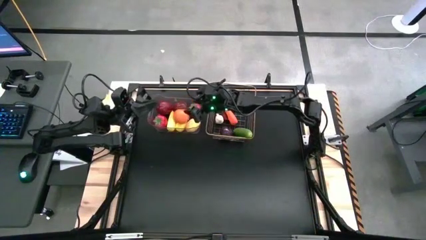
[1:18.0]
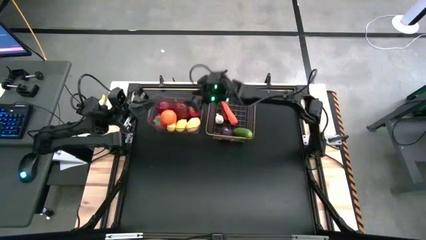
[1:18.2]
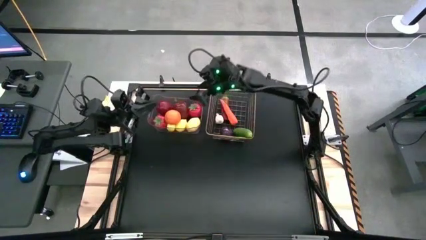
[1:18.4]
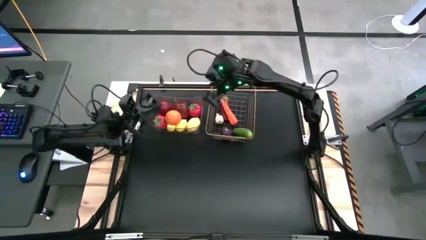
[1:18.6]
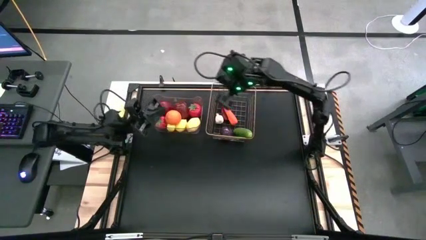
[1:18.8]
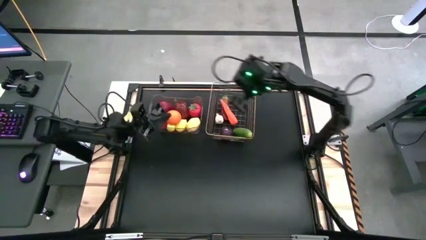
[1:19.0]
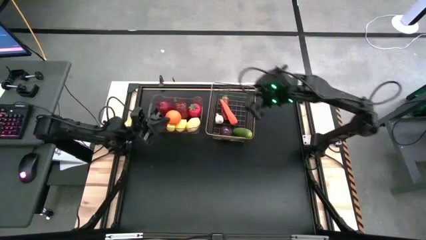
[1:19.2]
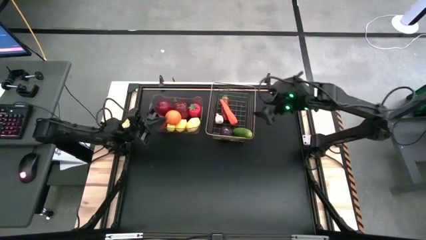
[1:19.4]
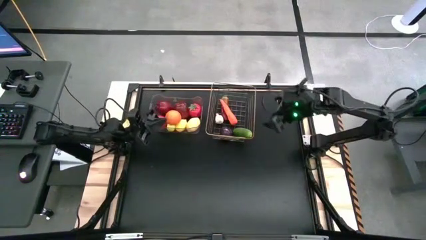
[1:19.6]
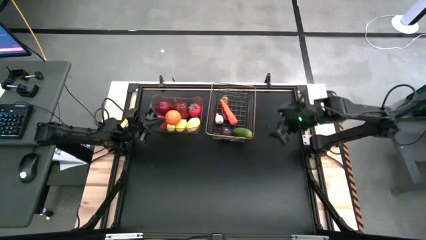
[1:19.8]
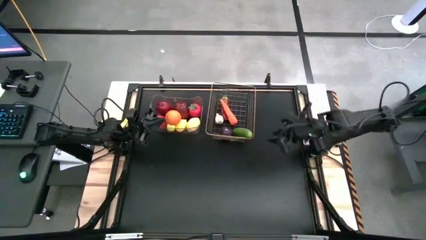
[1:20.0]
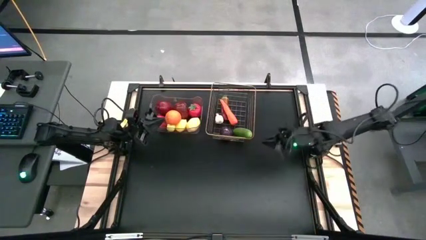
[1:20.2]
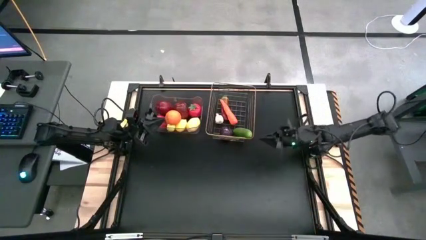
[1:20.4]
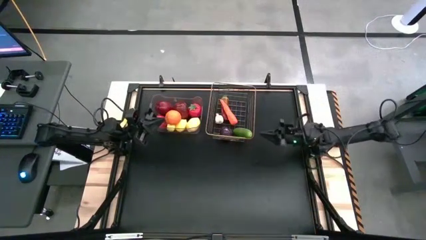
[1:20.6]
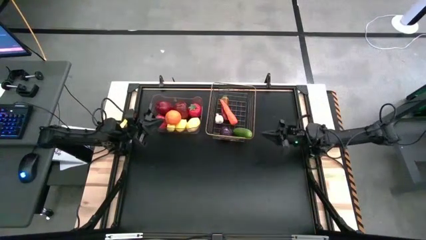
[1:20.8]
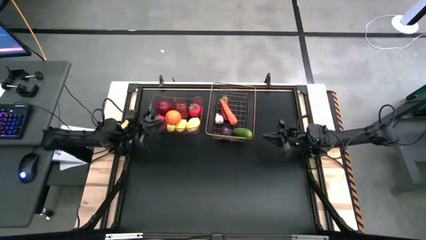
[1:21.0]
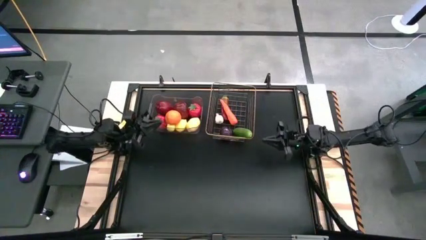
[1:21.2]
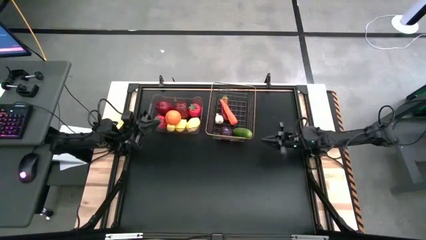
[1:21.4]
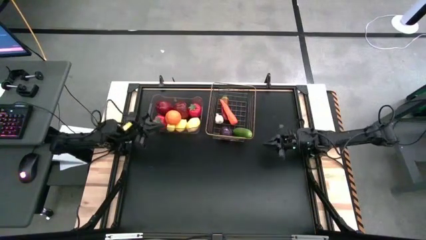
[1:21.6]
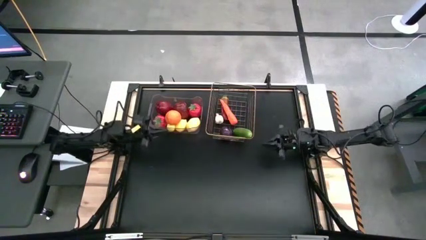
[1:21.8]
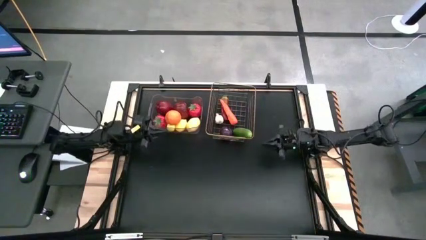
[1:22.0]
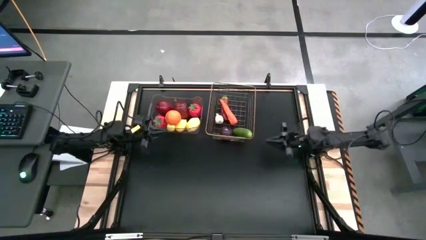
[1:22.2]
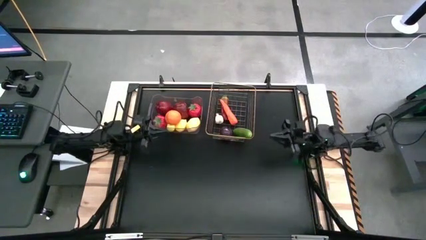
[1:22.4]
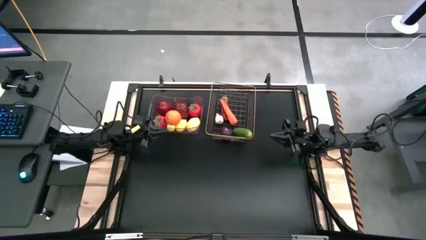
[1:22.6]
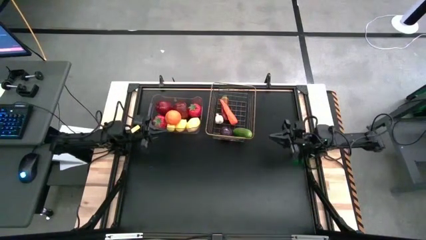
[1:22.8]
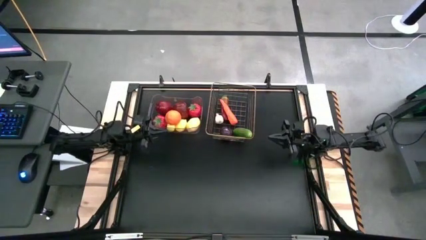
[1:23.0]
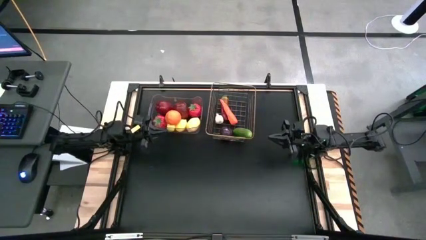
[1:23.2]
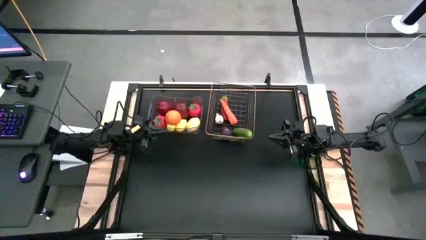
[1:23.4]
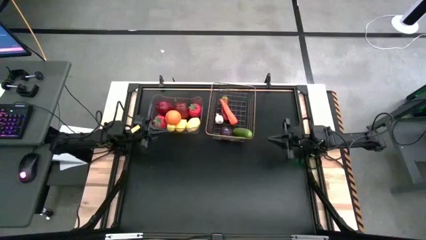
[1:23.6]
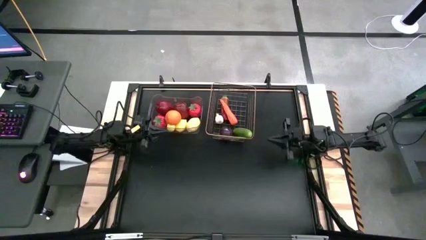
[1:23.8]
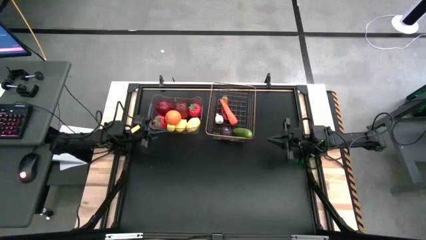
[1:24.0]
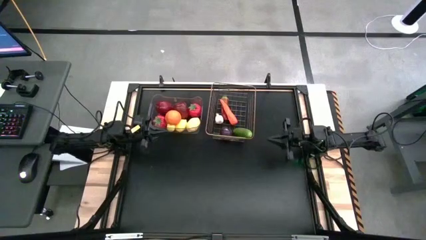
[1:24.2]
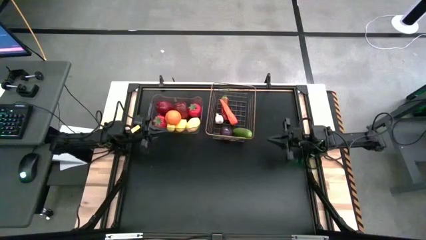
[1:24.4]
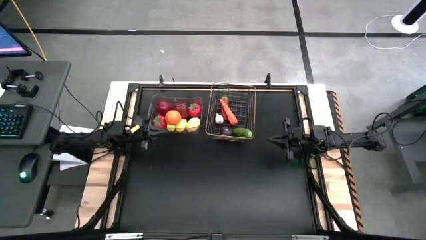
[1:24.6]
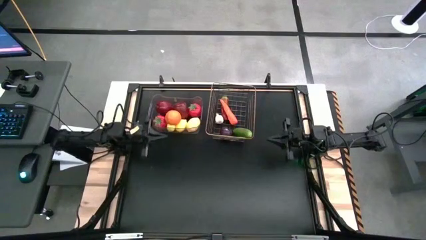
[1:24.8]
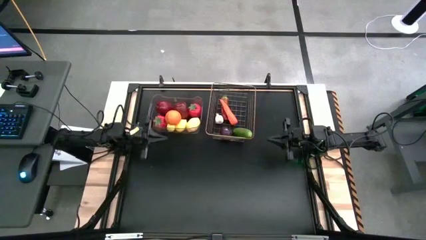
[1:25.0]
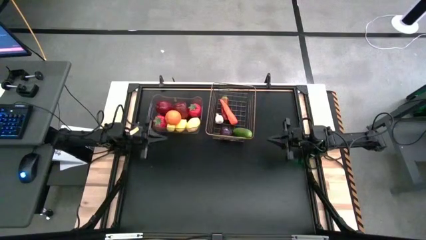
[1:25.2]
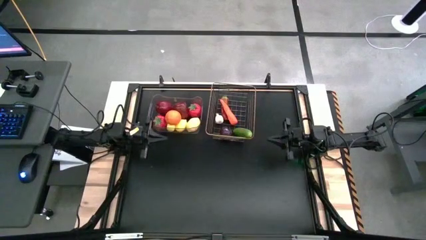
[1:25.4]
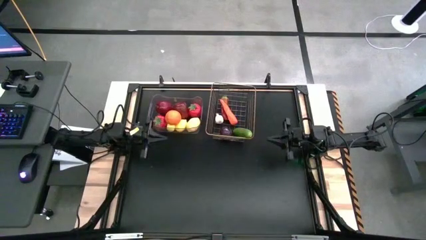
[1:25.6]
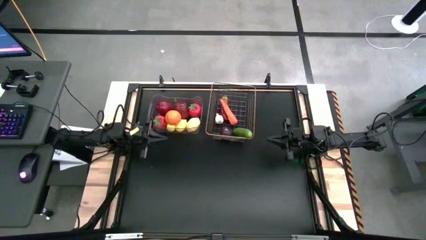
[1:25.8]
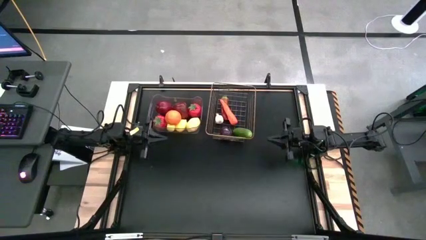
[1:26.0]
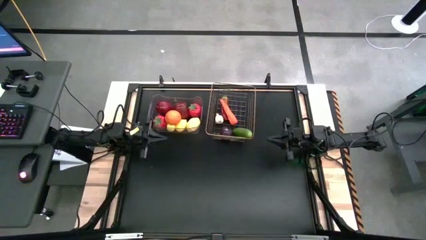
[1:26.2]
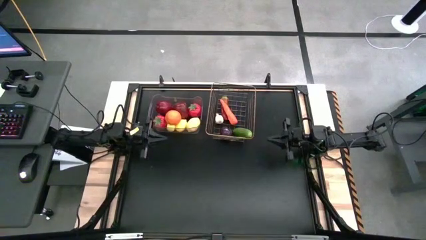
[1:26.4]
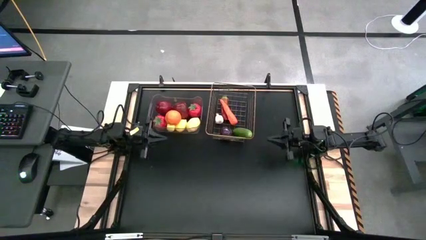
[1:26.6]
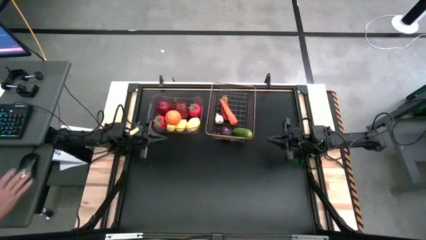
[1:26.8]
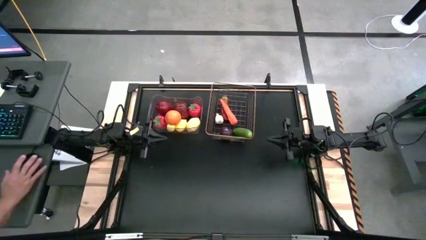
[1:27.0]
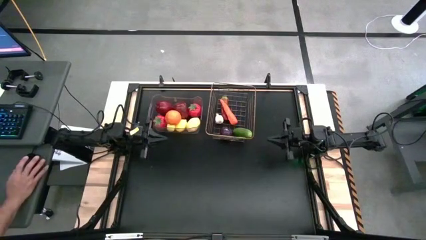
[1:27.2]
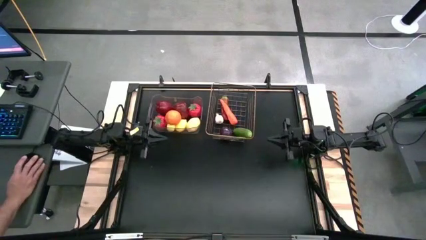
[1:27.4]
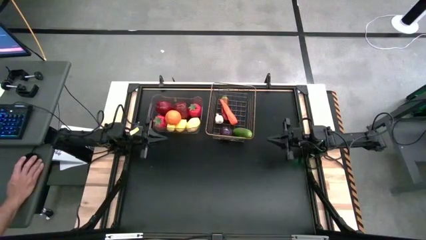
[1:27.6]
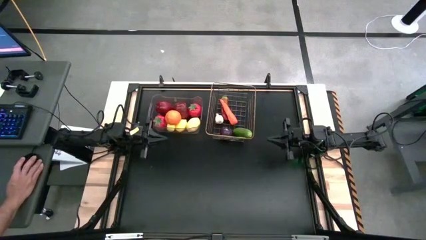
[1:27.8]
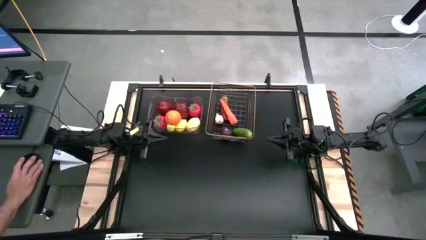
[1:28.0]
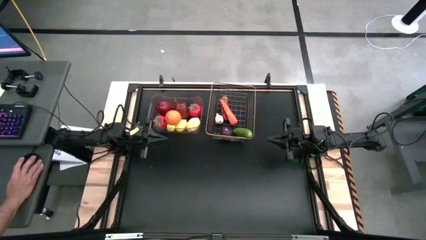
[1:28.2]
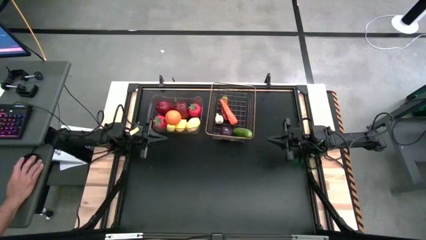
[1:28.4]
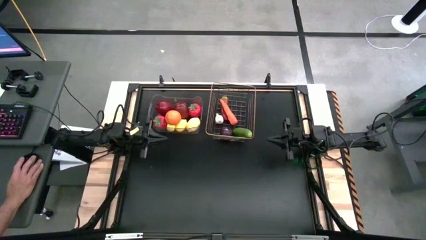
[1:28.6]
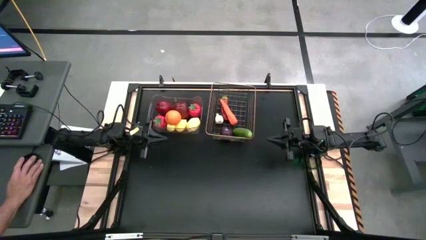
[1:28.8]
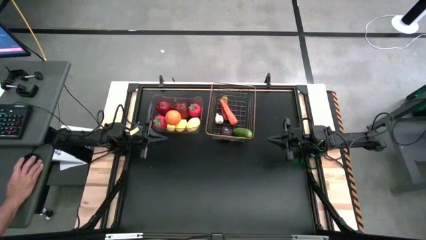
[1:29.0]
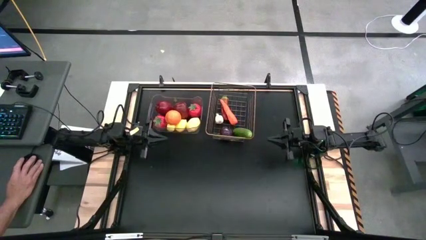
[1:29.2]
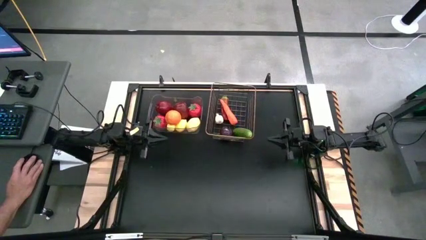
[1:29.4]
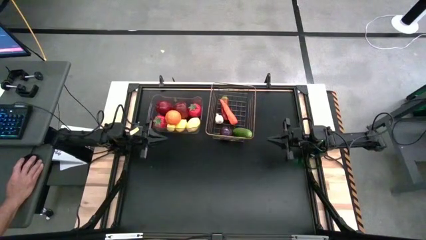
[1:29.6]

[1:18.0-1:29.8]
Task: Sort produce into baskets
Return to Home Position

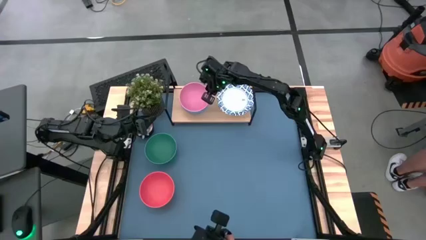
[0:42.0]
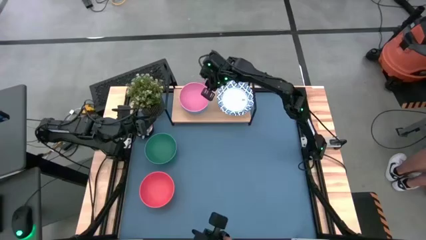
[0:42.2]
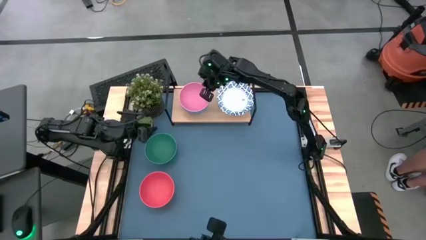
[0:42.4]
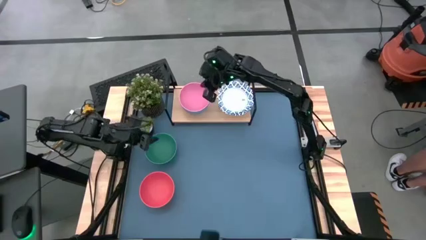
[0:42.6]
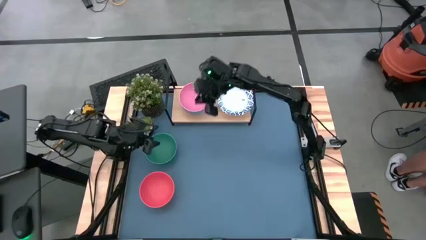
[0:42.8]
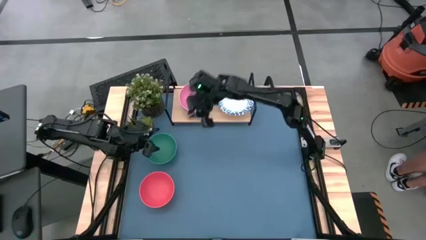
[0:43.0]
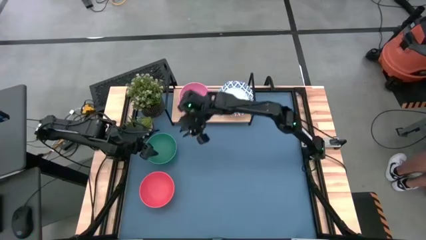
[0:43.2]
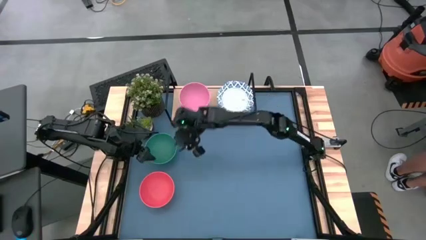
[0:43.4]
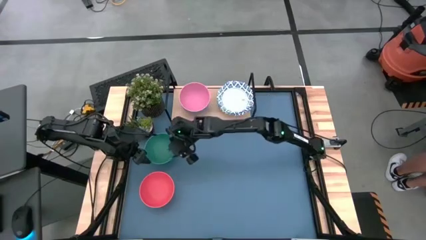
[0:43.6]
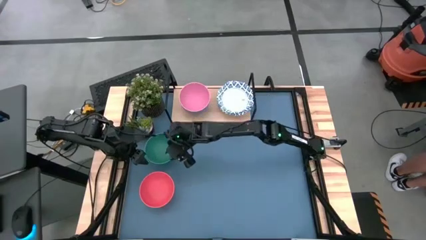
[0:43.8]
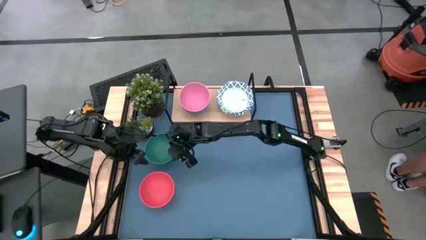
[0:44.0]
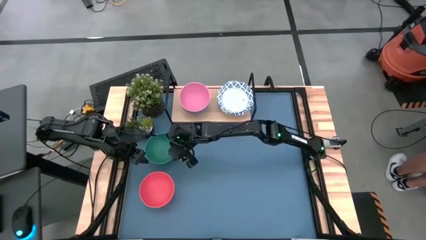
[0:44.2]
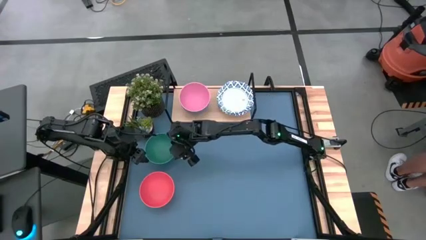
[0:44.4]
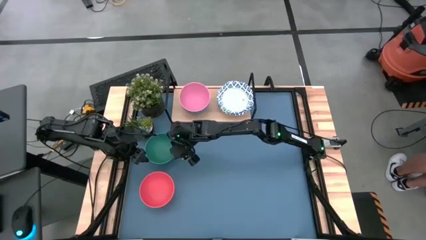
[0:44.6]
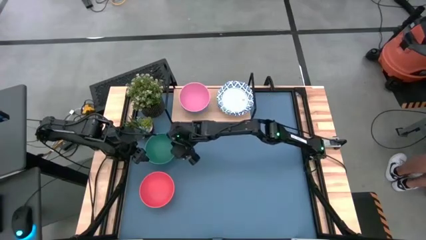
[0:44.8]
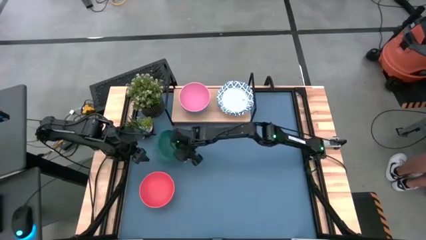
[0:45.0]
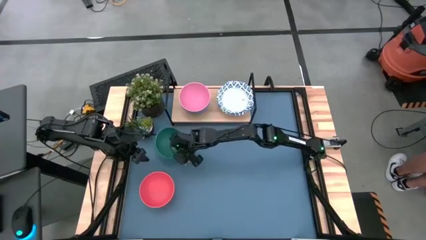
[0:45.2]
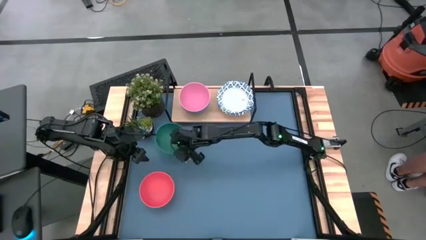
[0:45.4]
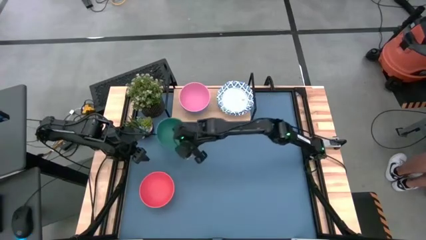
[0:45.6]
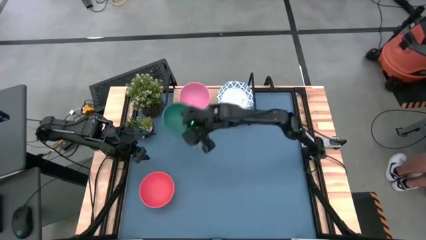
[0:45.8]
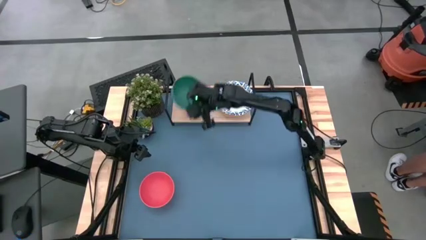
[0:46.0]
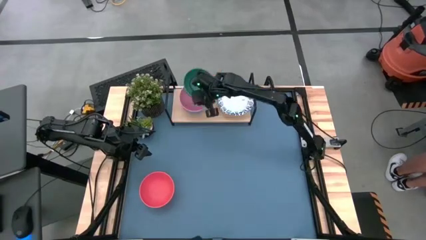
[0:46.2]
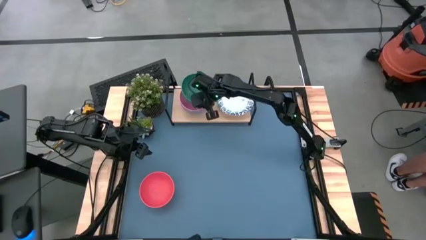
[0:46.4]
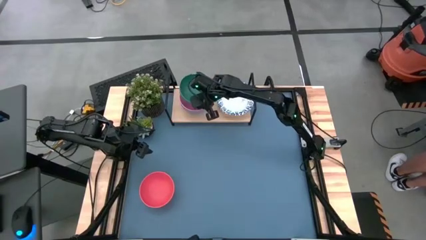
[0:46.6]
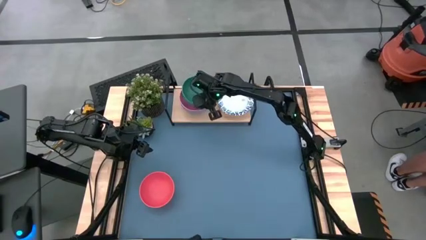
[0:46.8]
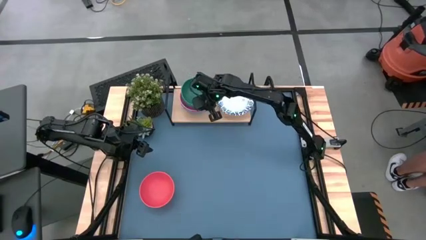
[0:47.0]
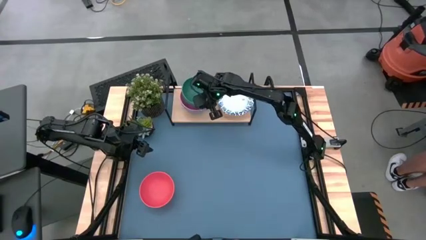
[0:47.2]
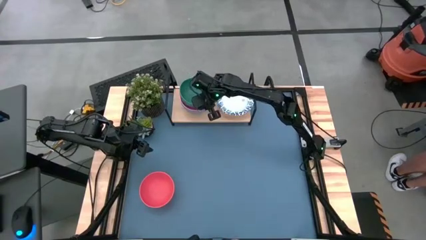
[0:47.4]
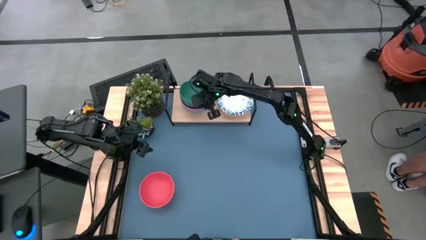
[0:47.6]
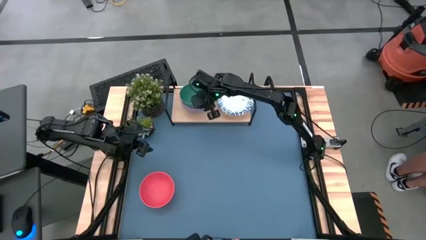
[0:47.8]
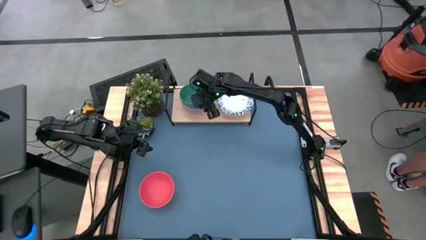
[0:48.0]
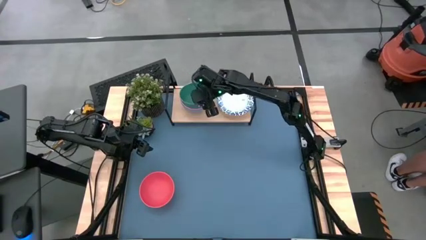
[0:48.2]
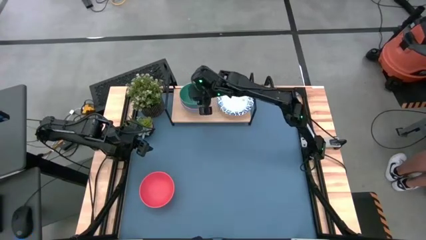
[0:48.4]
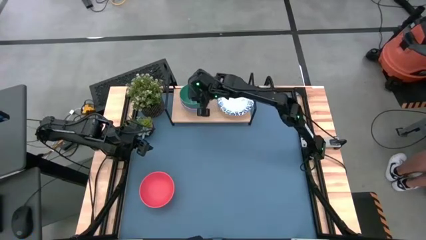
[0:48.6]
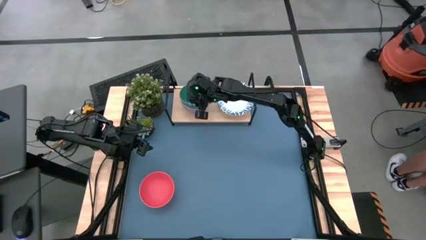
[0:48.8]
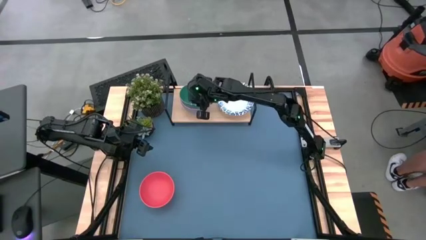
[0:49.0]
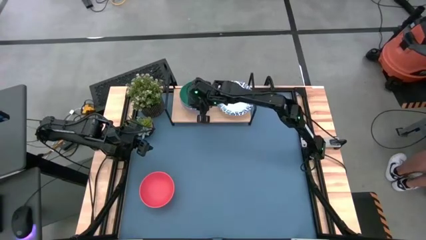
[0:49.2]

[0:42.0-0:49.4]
Task: Place and stack bowls onto a shelf
Stack the green bowl on top of the pink bowl on the shelf
